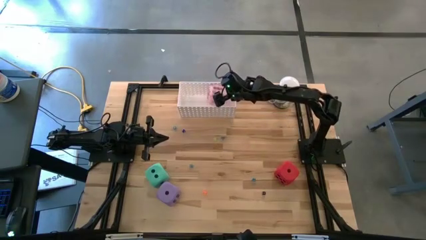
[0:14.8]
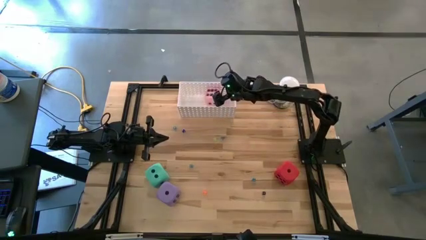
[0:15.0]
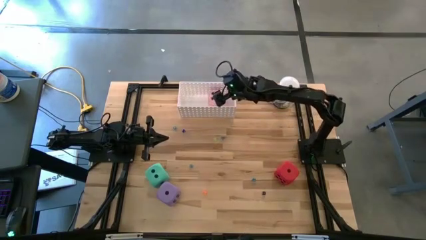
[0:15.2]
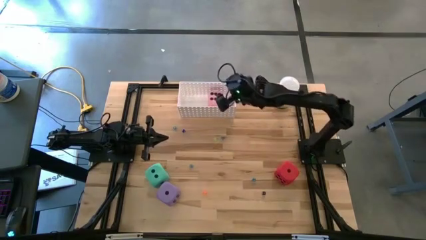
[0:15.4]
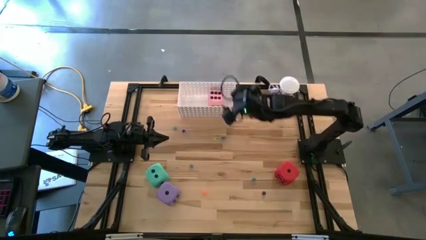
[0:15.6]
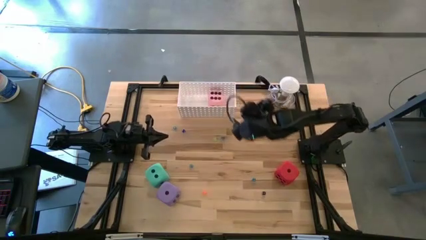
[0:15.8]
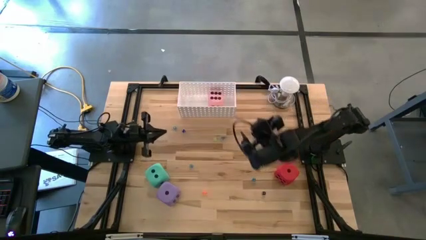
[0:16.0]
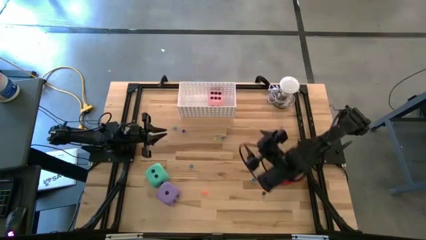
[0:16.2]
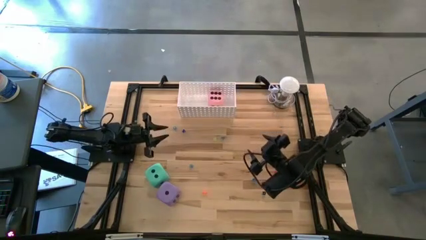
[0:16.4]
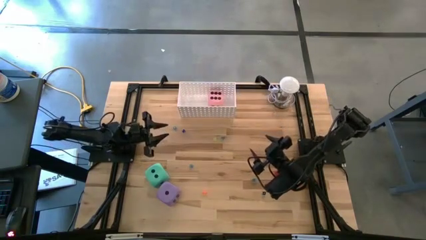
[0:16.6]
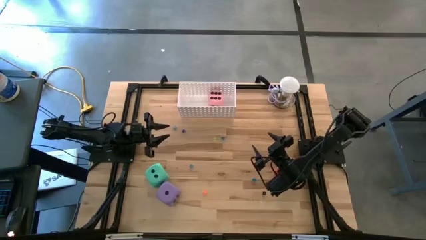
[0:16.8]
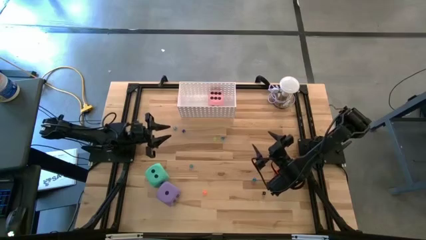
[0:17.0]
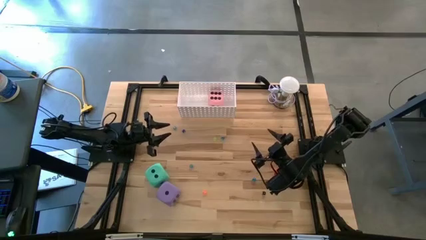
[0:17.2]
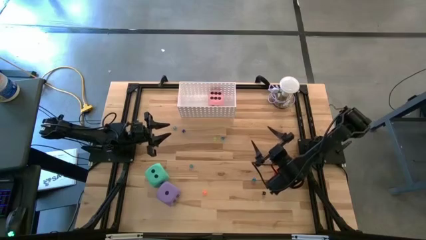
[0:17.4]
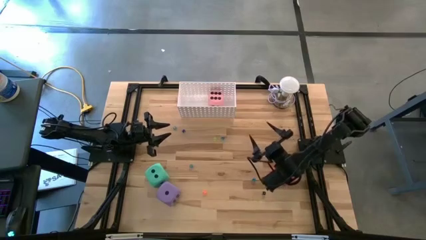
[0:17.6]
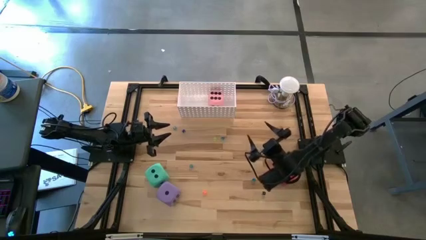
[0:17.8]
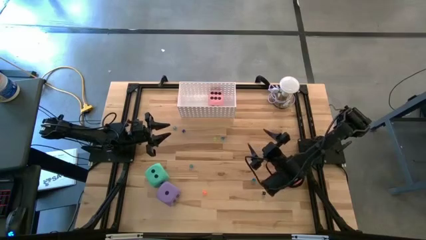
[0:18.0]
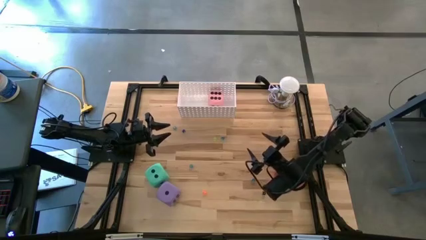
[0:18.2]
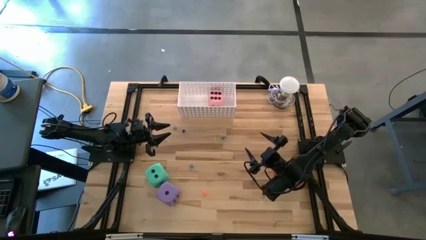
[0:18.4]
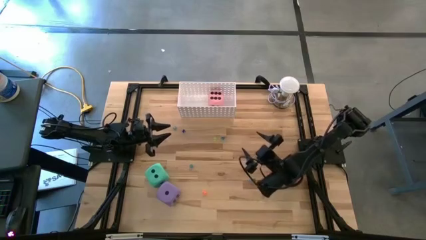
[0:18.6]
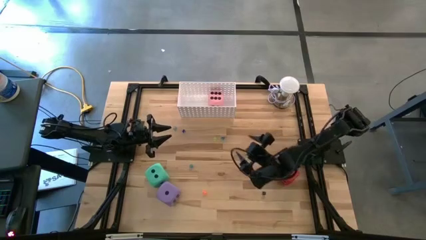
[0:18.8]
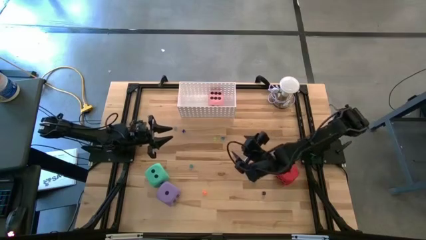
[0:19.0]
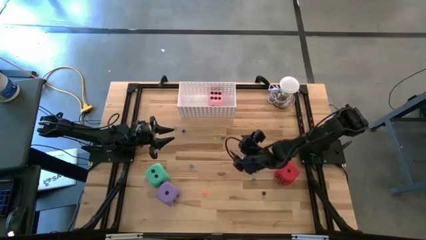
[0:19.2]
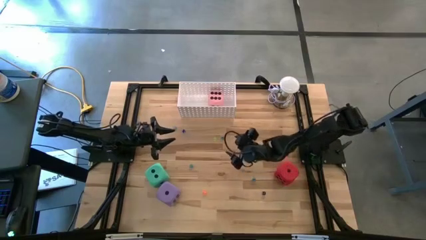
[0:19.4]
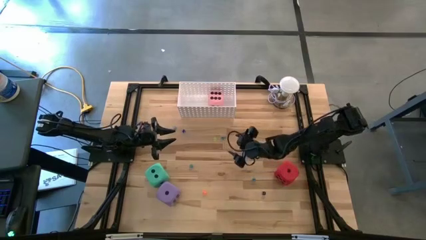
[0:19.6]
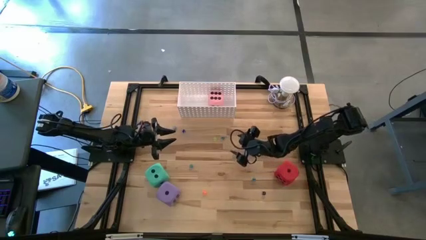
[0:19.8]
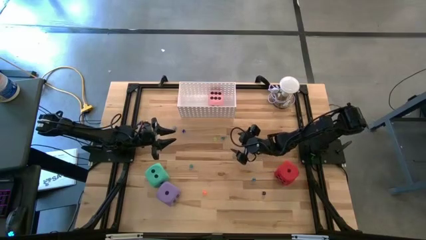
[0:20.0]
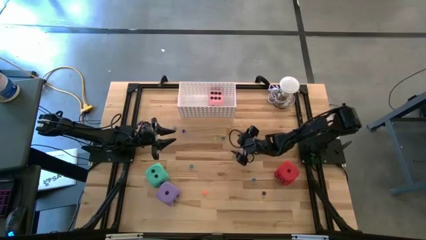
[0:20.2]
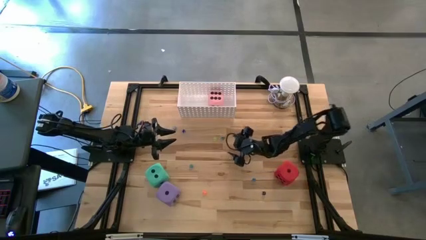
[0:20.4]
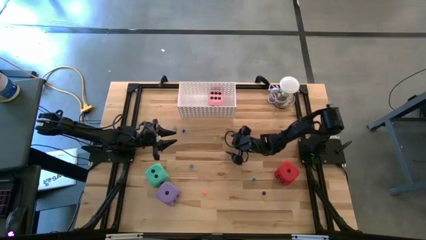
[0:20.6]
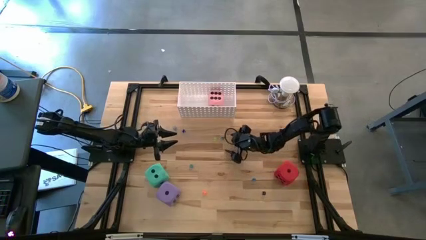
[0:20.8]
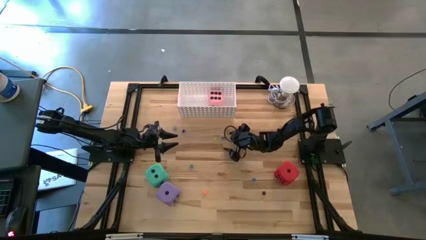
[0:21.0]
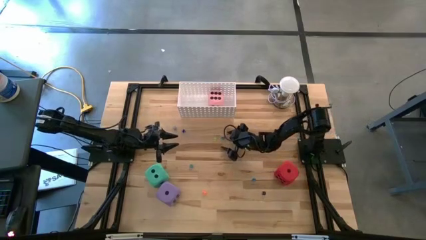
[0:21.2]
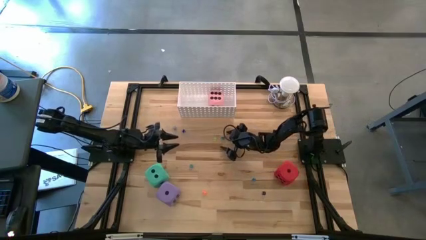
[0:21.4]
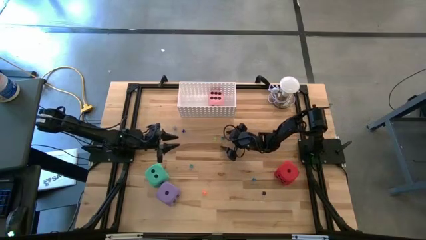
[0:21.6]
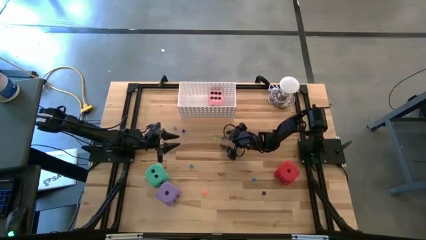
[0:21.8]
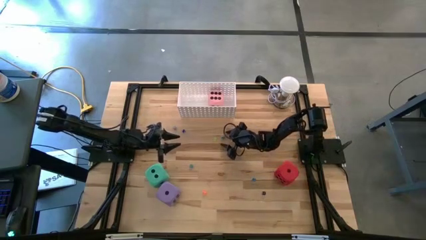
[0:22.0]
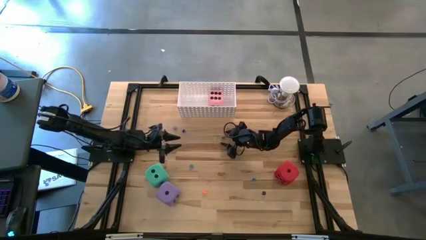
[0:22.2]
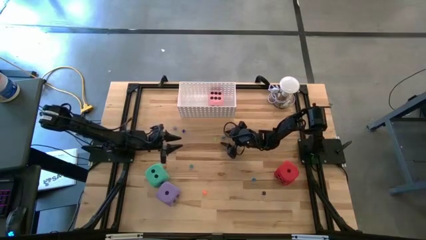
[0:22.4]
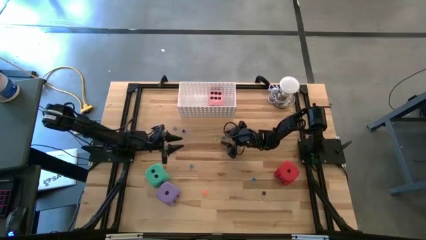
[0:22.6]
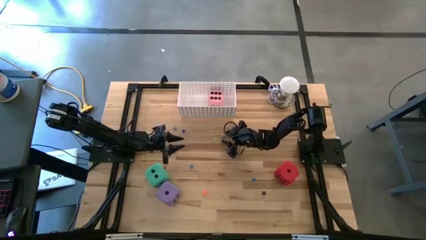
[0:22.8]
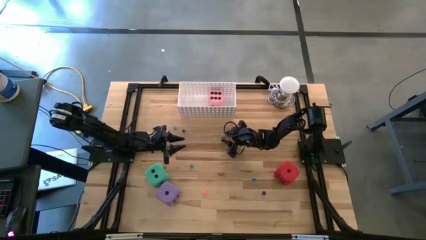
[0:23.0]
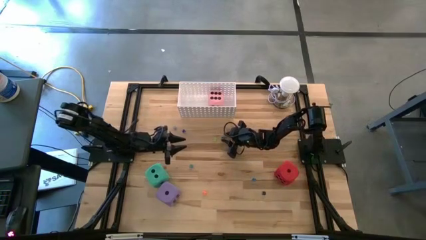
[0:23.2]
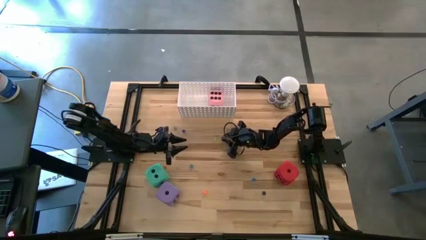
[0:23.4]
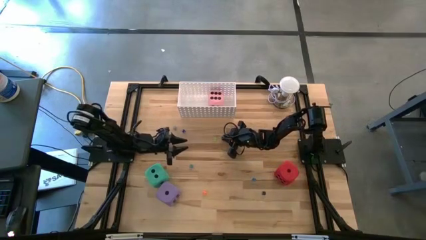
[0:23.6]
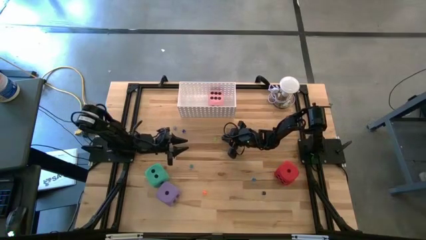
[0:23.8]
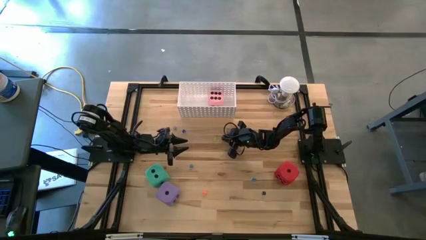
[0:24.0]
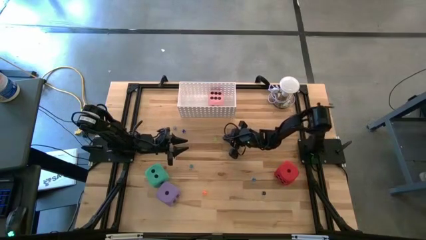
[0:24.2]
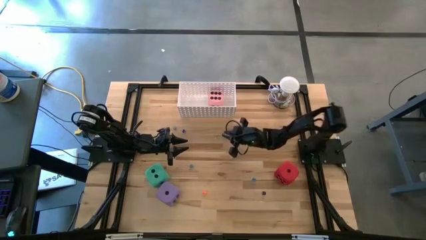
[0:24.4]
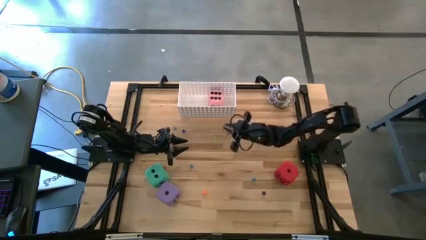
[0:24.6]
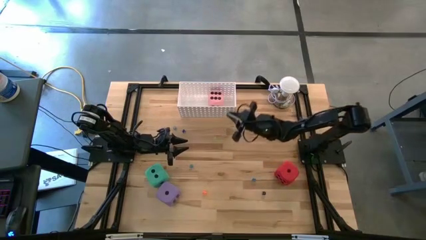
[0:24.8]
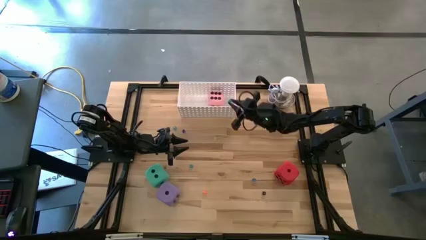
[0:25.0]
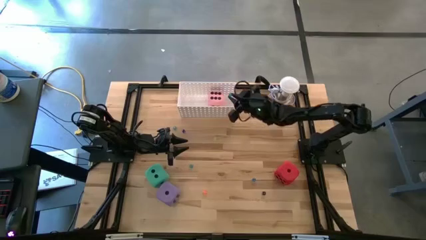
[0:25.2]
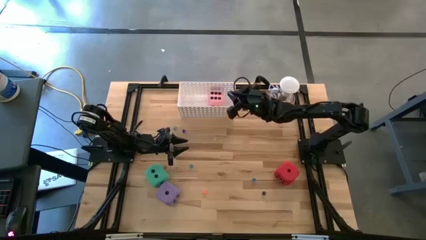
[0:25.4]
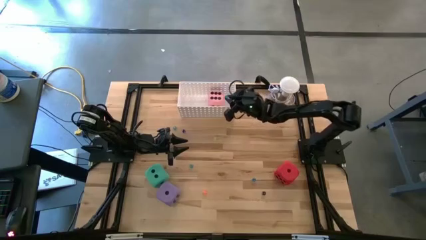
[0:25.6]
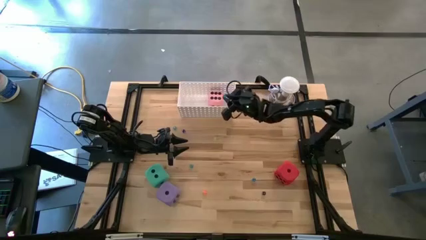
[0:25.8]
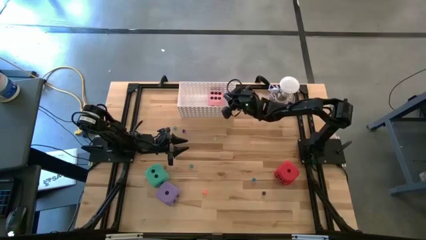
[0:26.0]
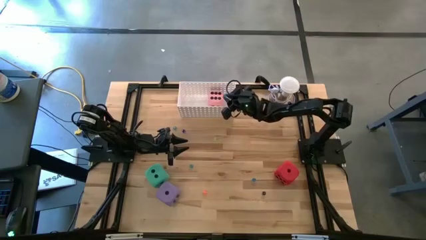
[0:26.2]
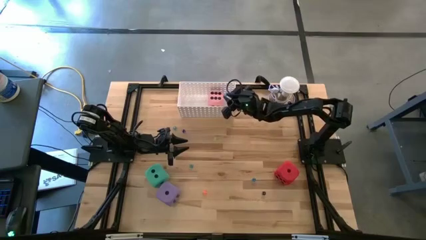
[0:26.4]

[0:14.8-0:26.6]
Task: Pick & Place Dice
Put the small blue dice into the white basket

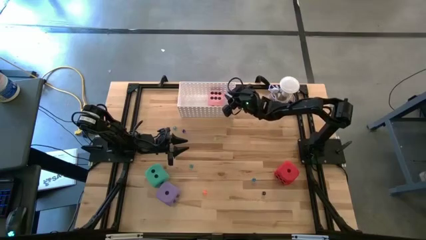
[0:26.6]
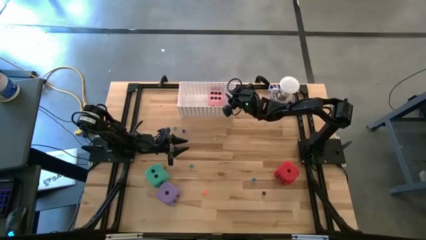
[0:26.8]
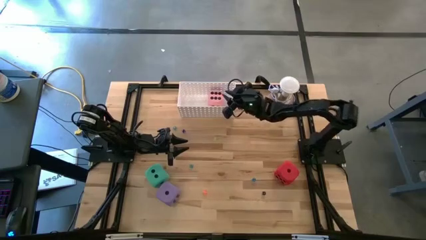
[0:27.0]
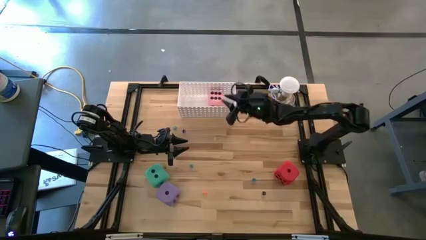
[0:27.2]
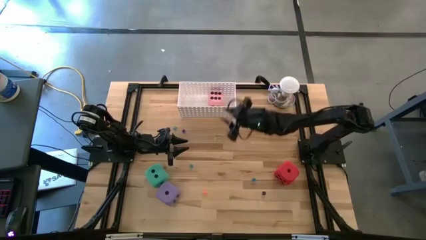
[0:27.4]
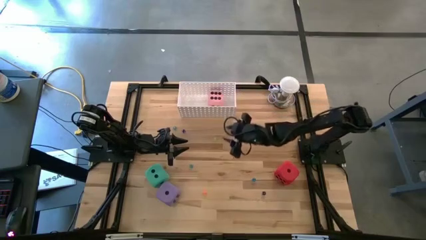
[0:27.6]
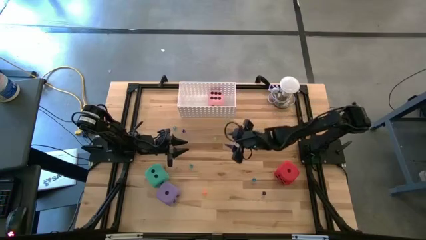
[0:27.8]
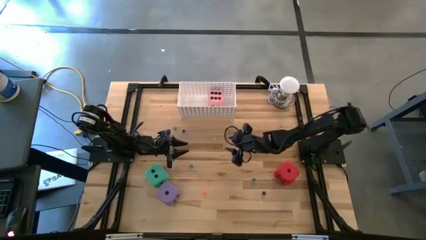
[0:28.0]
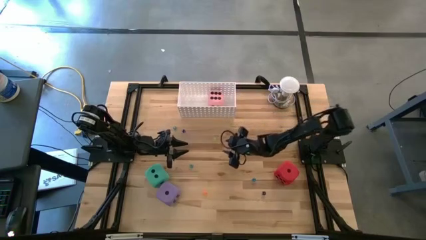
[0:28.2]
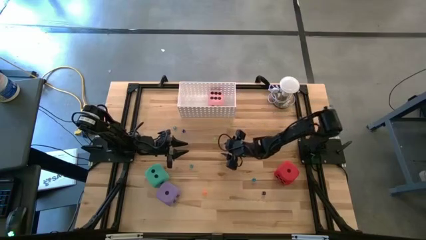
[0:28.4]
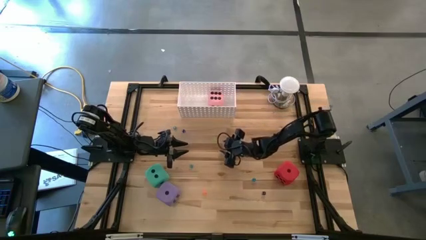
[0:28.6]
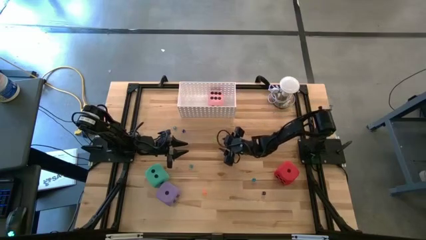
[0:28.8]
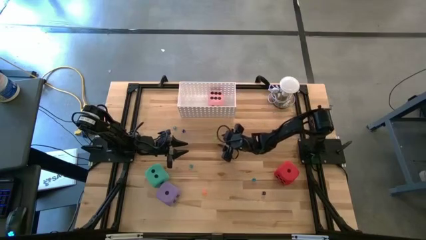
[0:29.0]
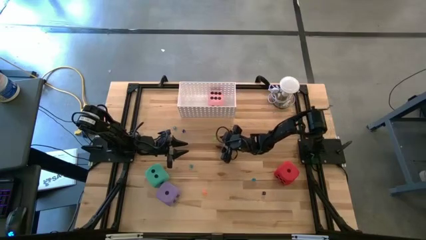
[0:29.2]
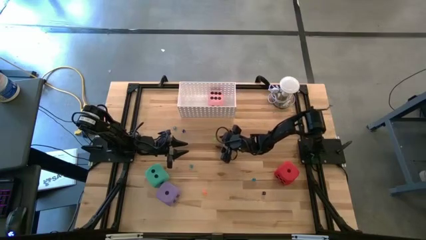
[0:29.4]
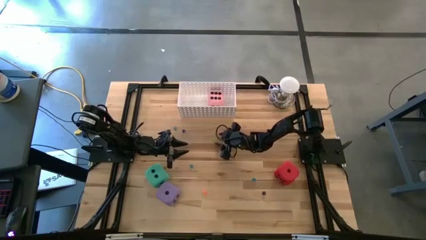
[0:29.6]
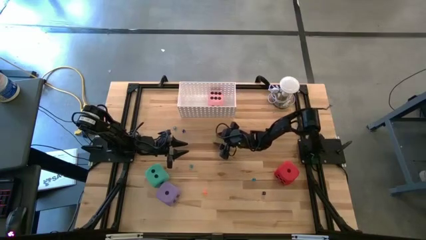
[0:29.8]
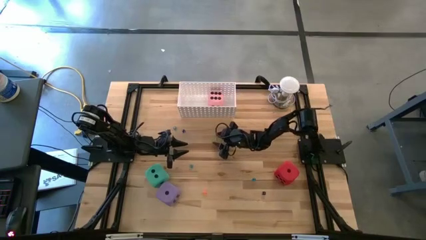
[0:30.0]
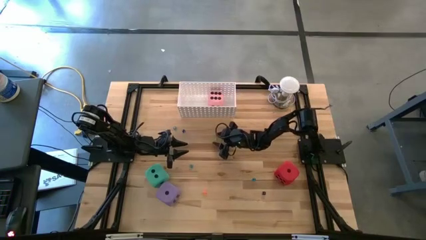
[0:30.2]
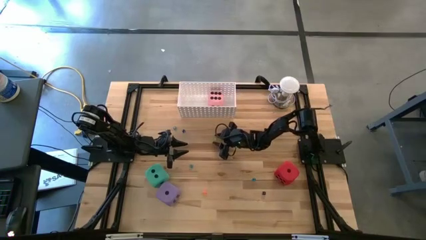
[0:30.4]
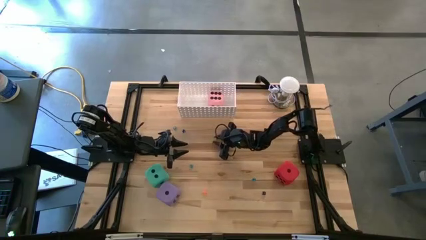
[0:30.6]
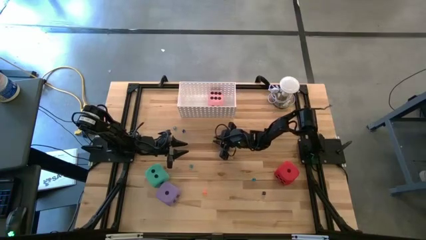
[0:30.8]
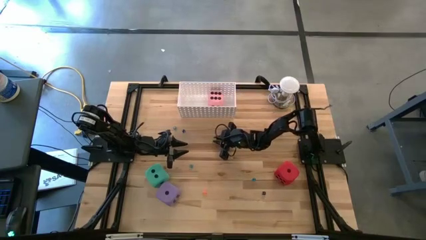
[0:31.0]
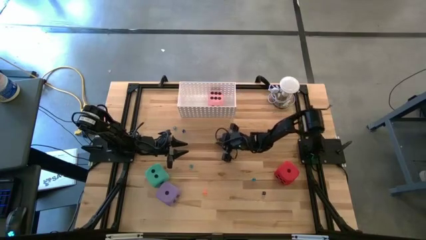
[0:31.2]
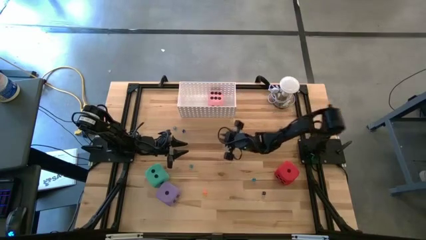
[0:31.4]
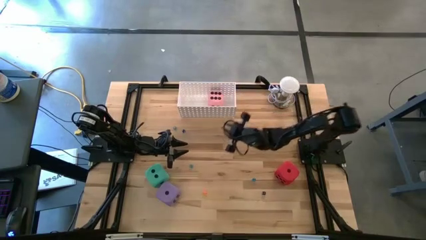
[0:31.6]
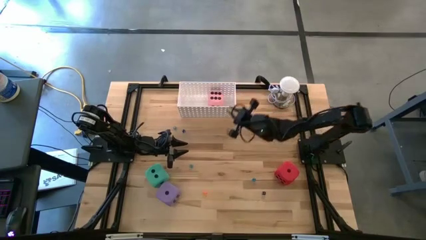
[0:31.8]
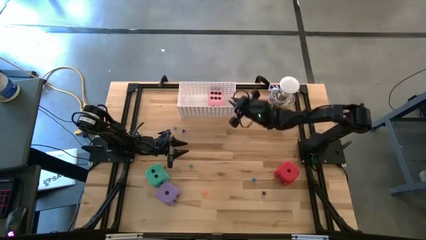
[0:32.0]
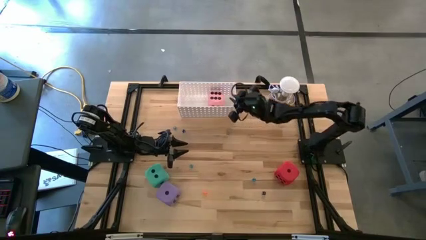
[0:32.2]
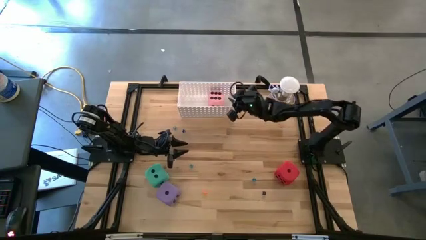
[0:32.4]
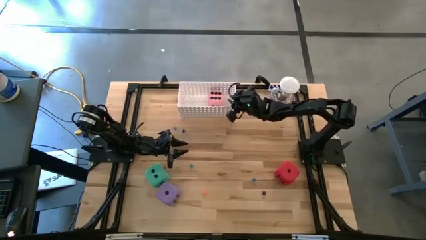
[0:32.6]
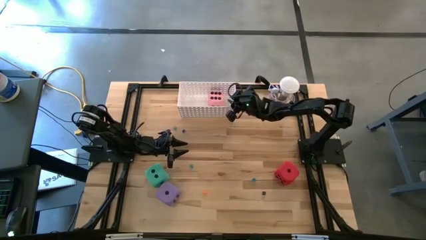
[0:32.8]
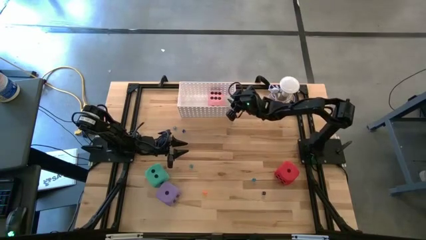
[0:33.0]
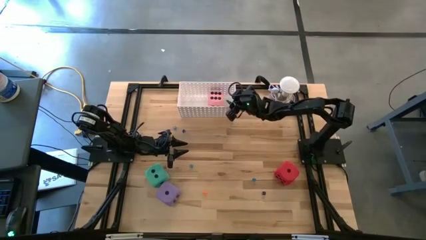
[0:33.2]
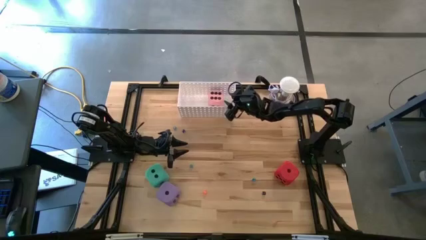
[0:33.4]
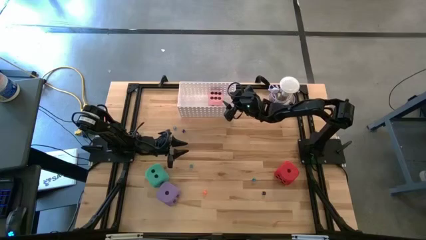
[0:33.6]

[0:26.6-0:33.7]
Put the small light green dice into the white basket
